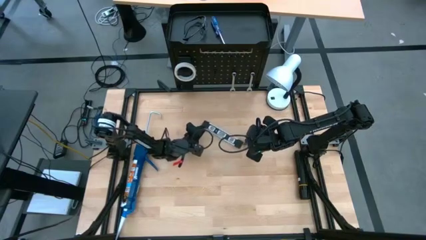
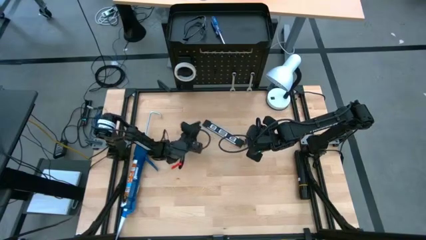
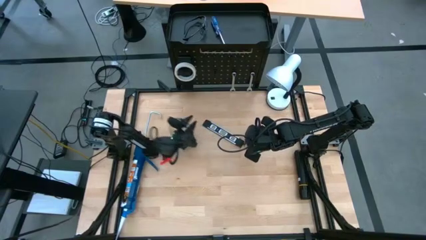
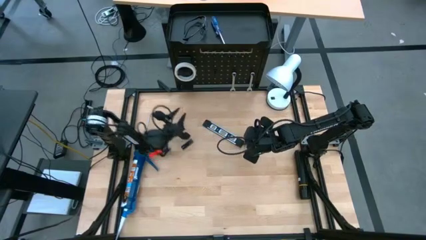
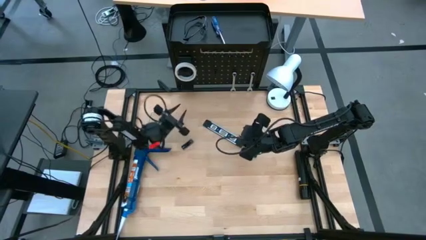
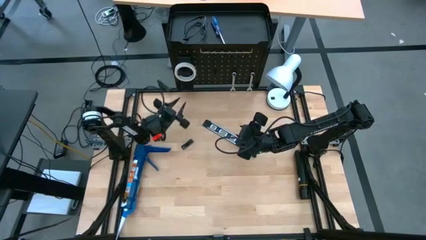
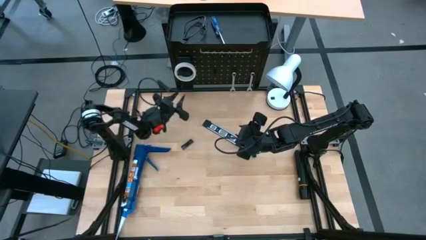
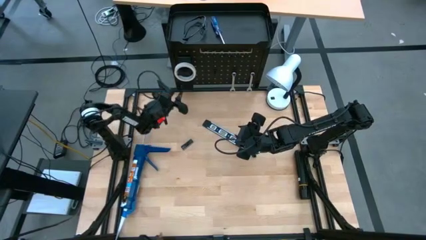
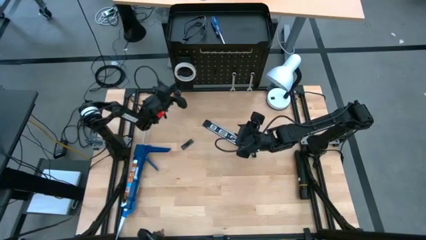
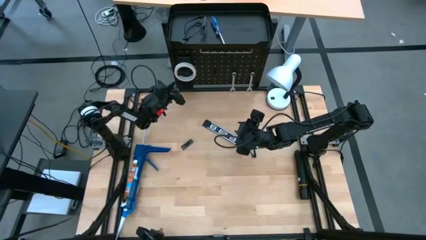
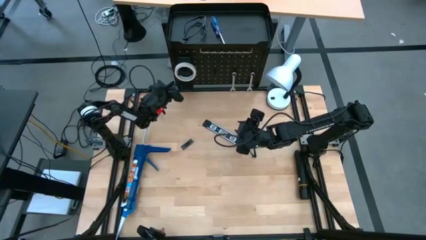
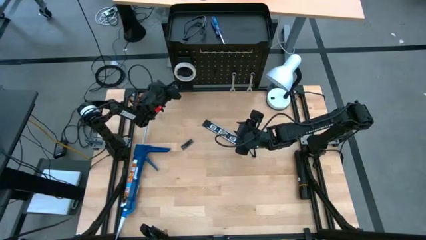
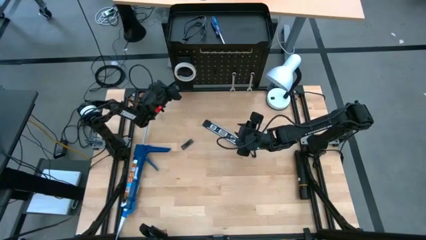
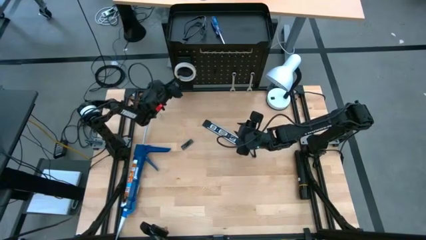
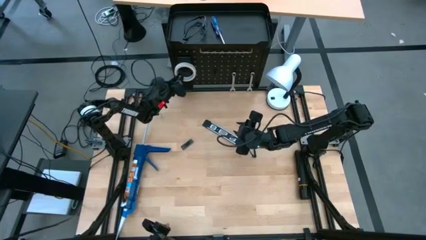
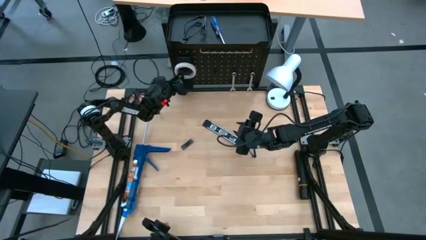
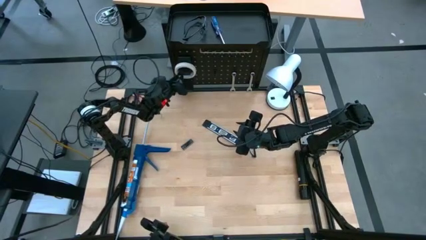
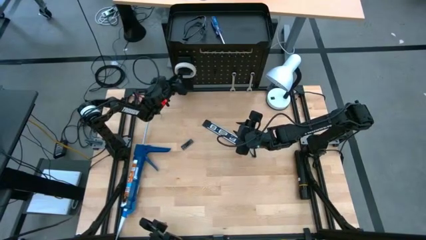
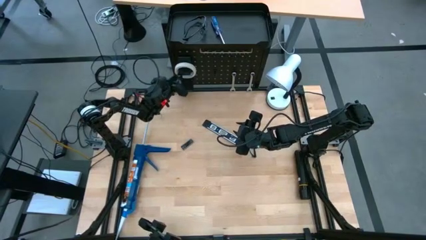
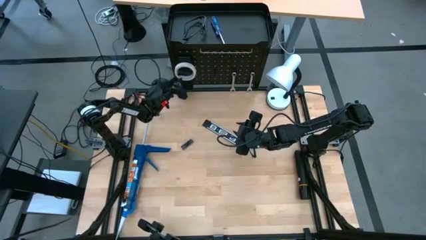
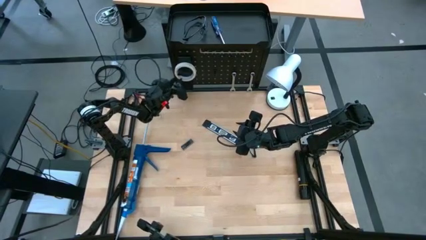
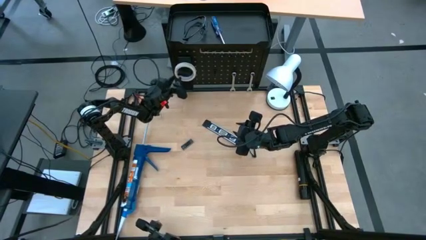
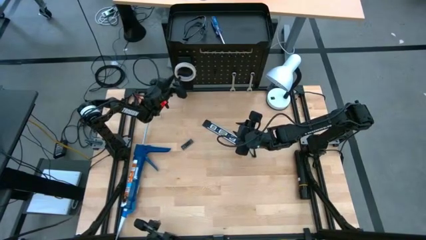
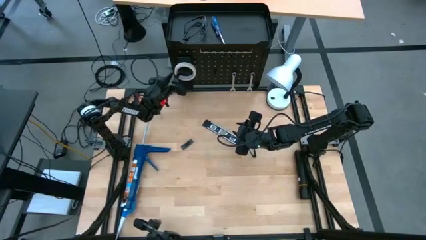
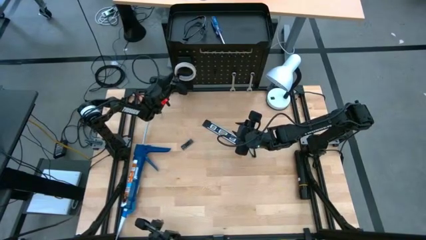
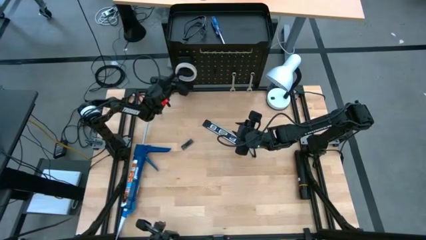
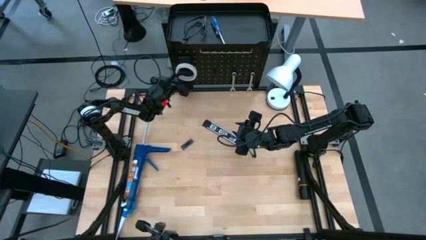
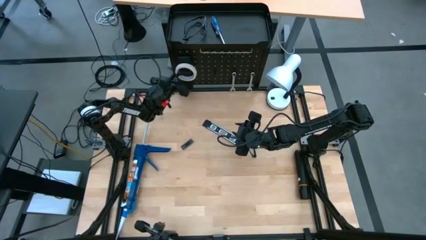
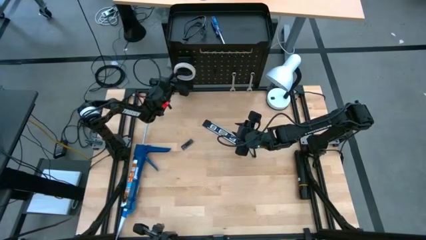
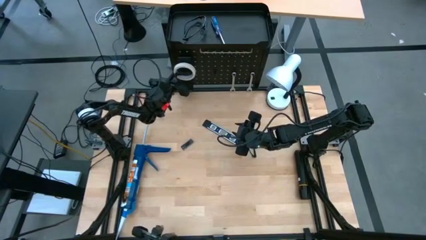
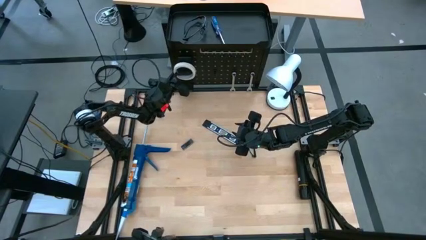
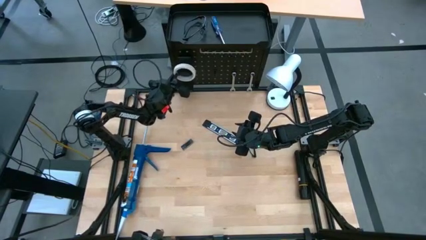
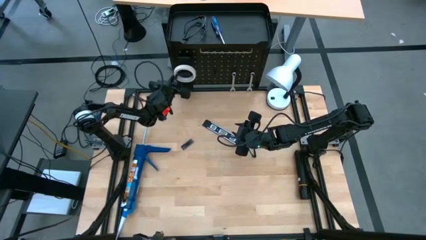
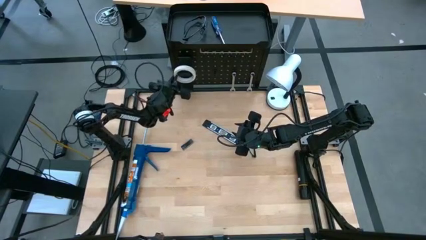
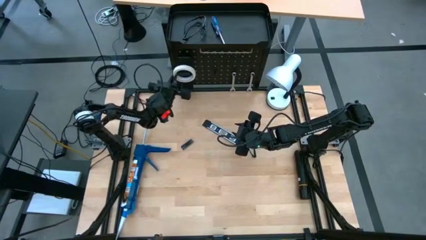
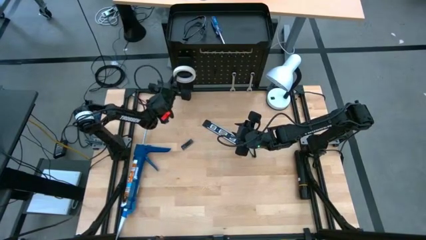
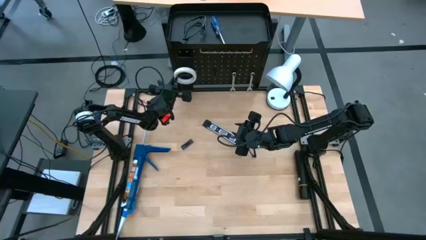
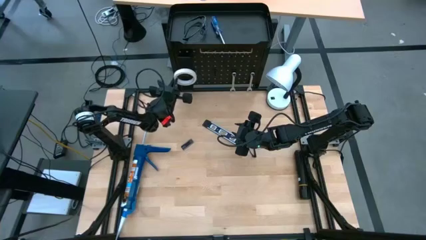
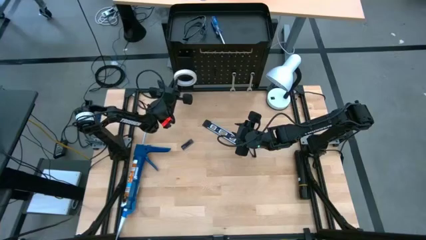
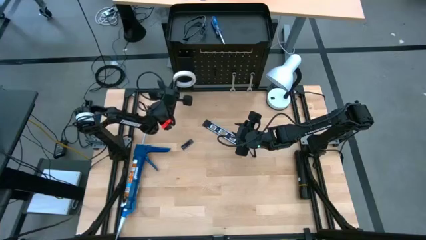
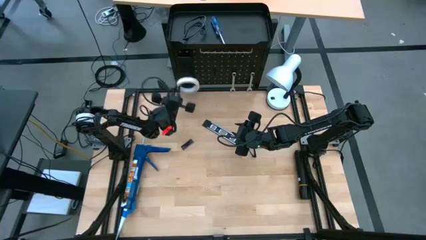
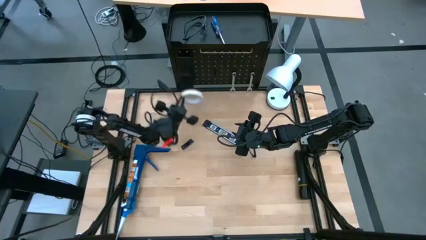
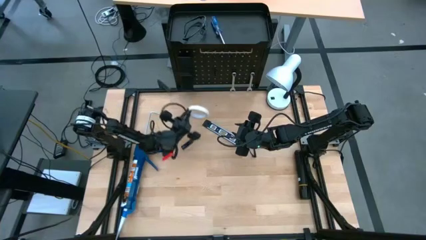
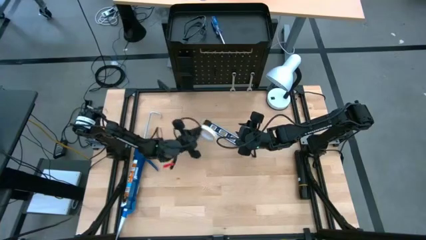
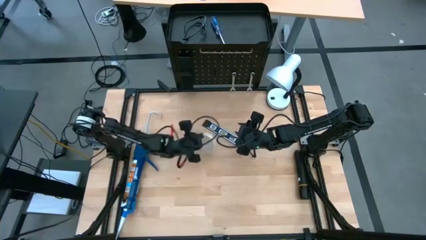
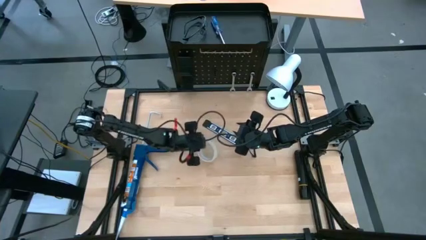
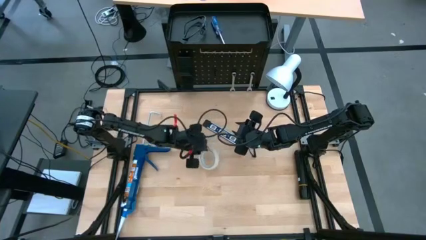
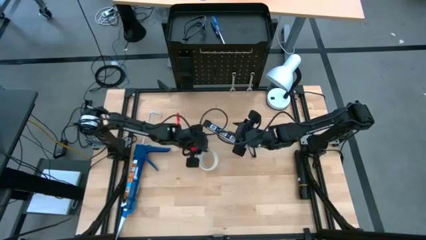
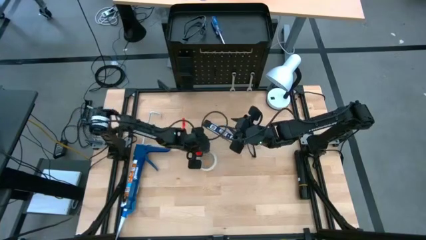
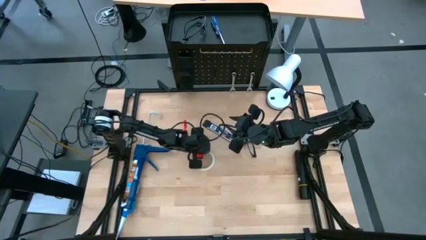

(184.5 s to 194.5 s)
Task: Hang tools onto peg board
Unhang the masking tape from the peg board
